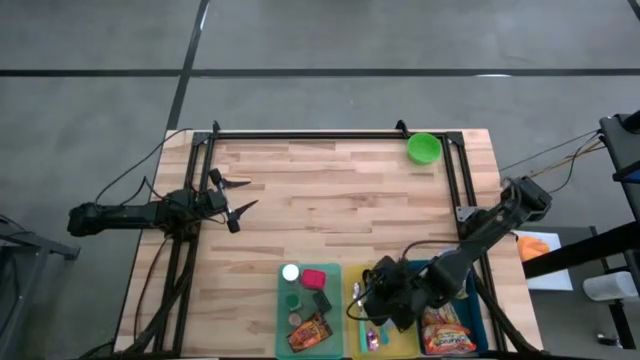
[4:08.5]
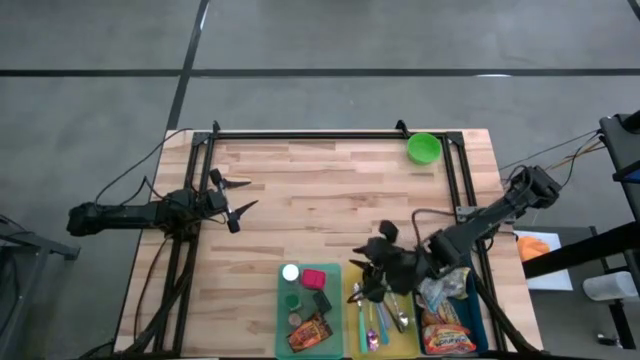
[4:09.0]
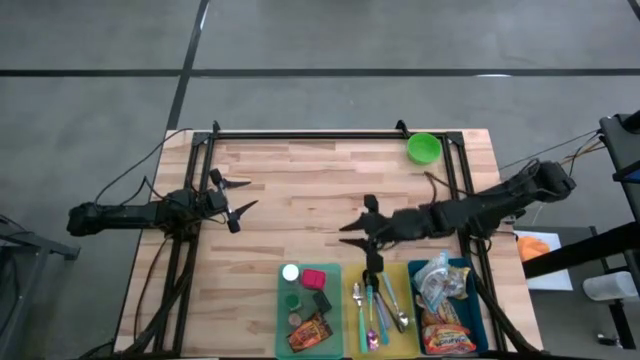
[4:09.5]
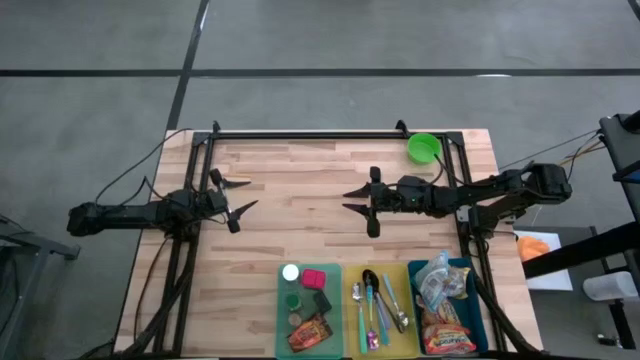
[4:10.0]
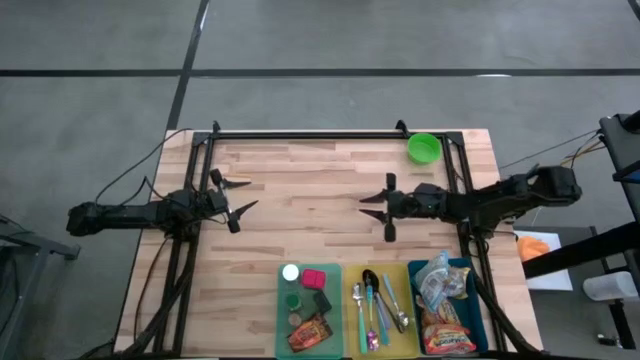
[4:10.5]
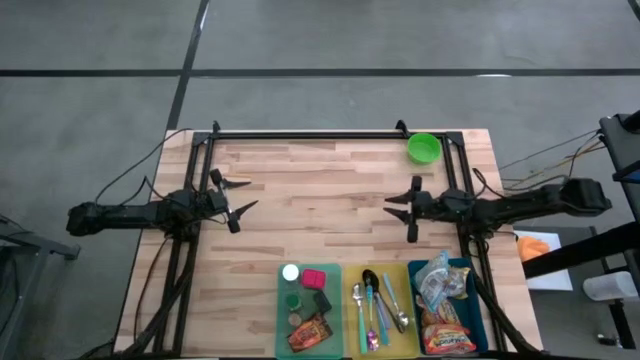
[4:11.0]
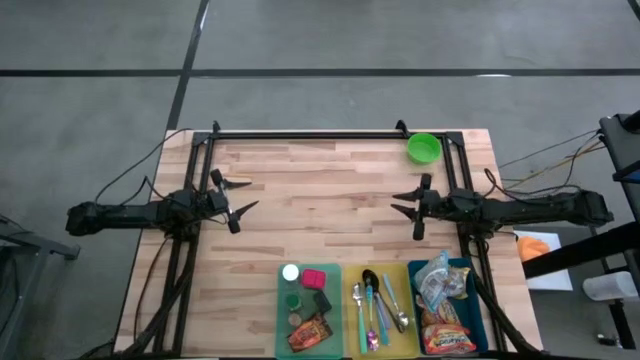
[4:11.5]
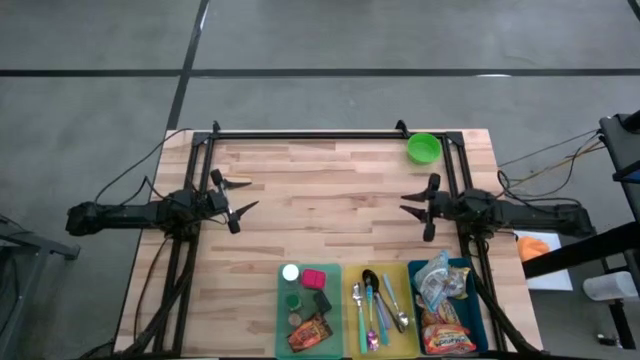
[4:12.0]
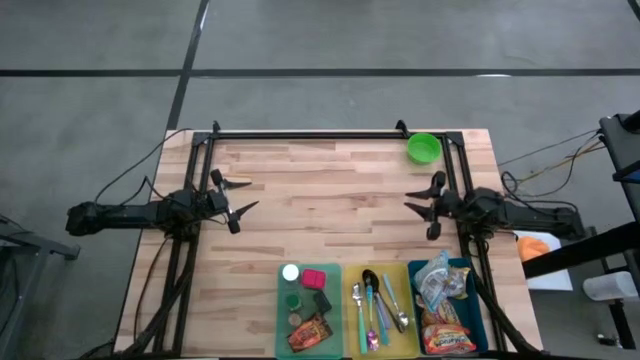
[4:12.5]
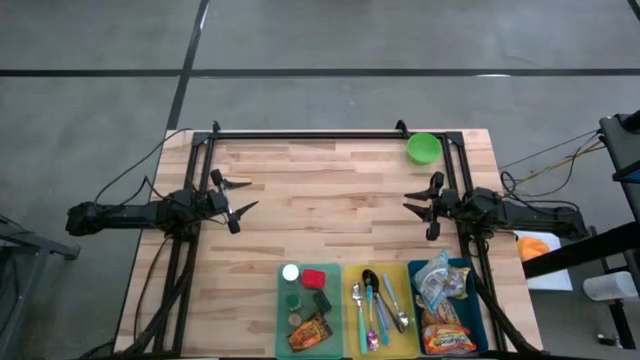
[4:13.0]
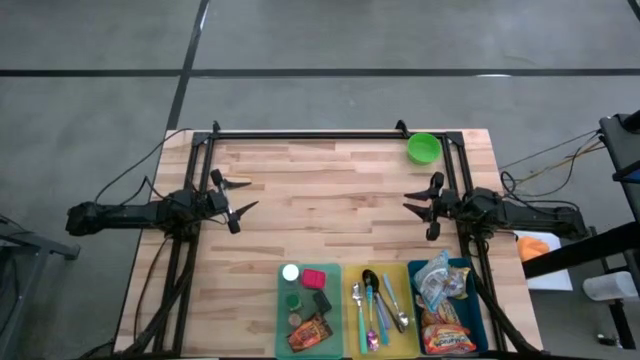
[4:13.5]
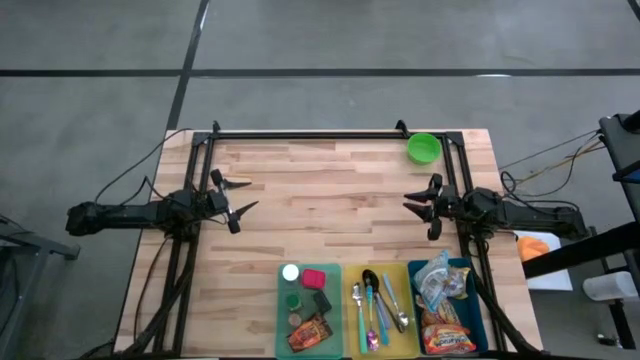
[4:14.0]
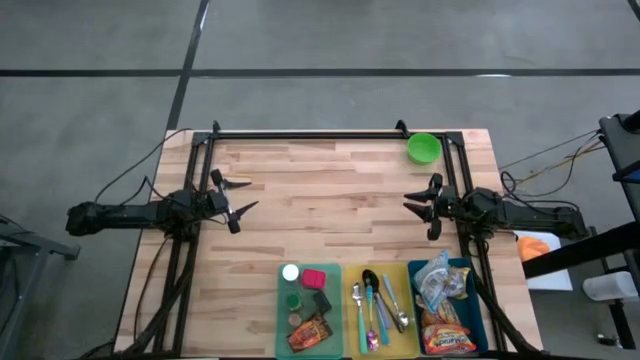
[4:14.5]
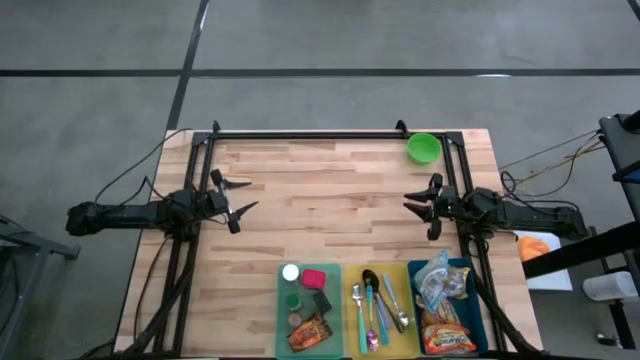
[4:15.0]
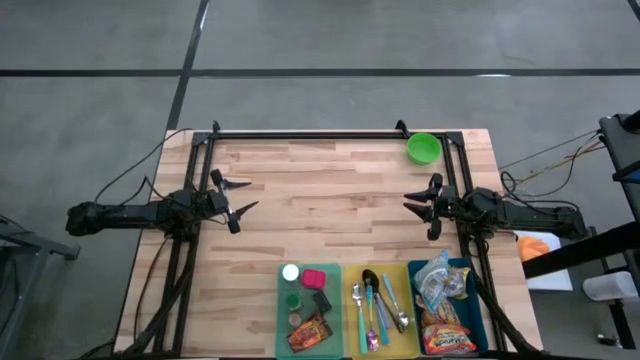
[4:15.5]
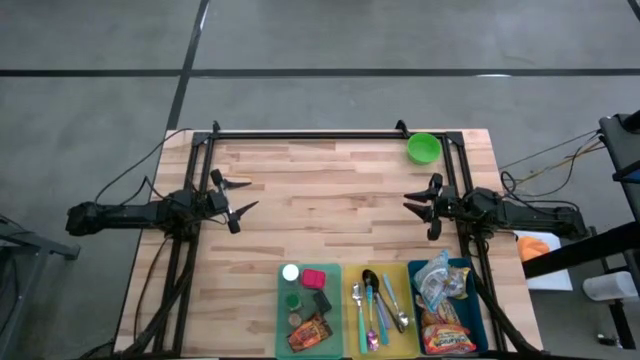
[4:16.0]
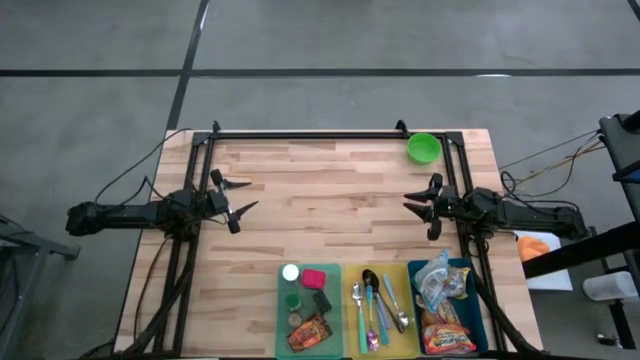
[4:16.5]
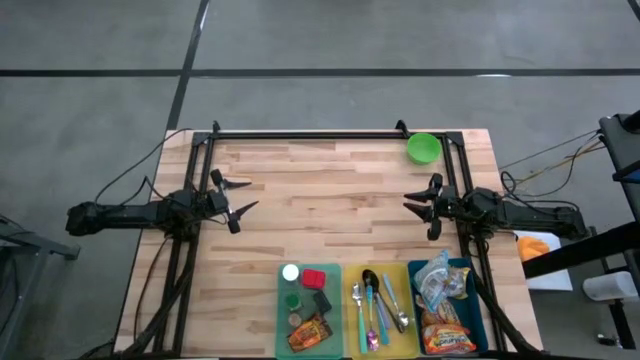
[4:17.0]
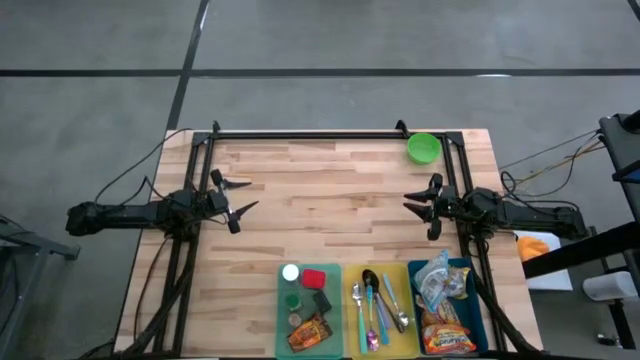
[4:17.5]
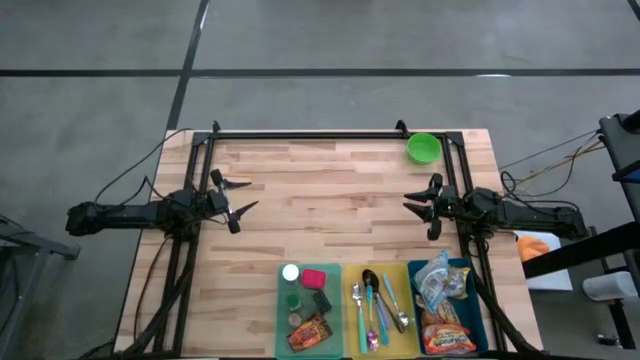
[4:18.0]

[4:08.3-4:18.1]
Return to Home Position
